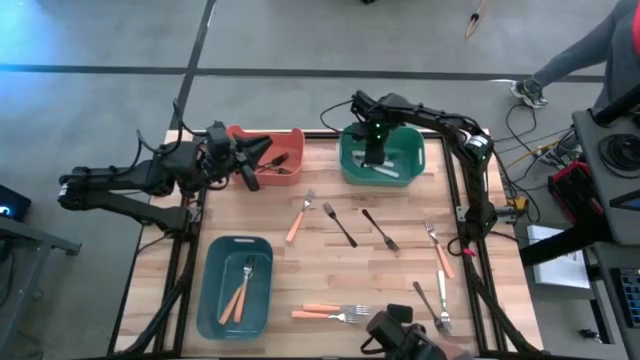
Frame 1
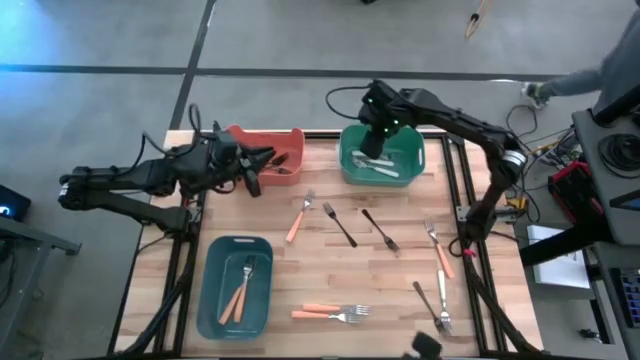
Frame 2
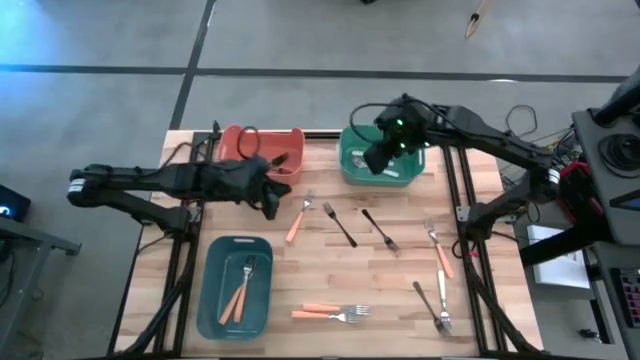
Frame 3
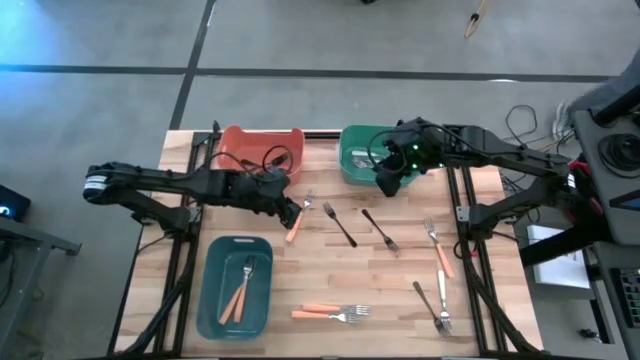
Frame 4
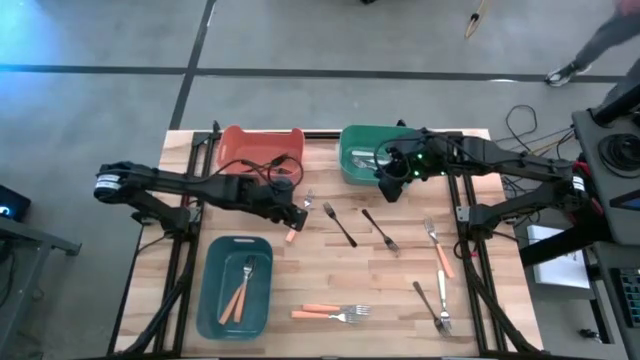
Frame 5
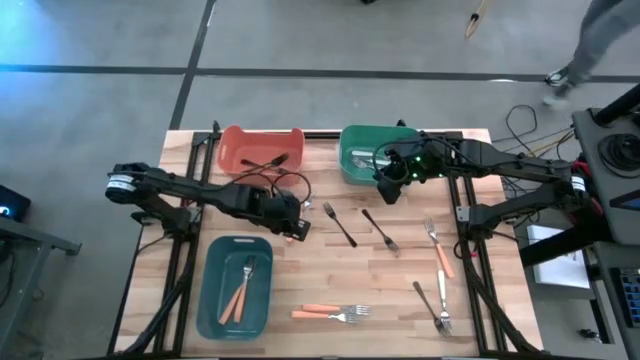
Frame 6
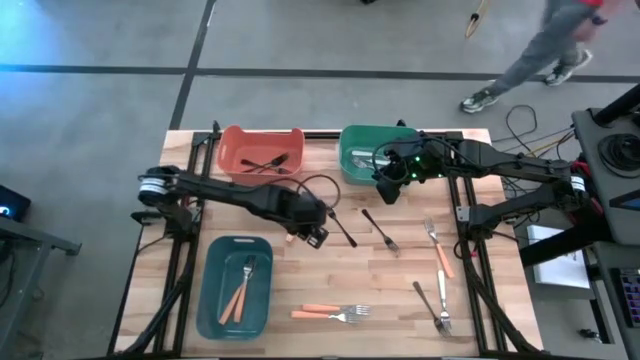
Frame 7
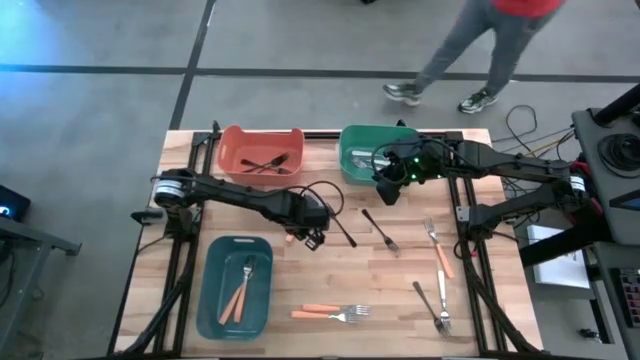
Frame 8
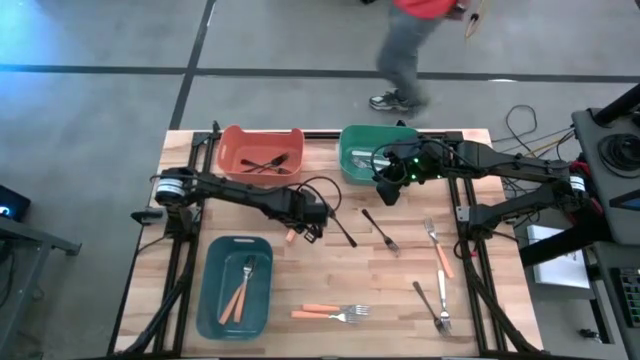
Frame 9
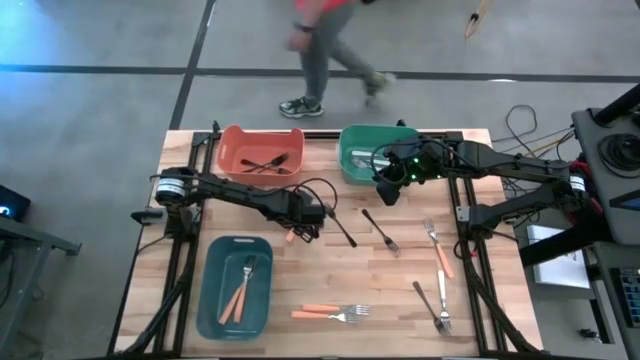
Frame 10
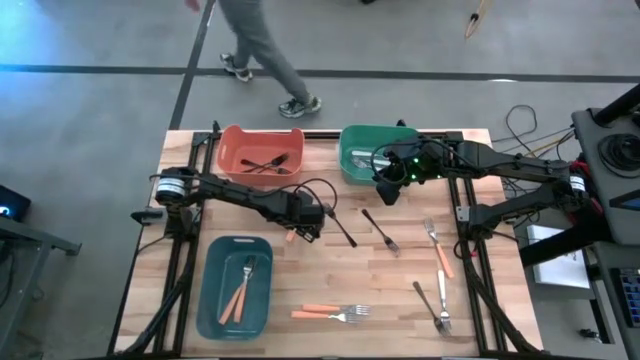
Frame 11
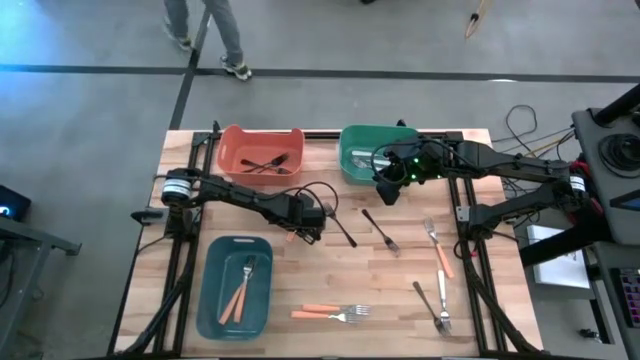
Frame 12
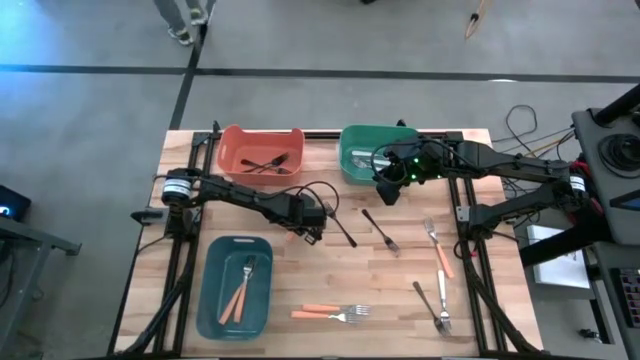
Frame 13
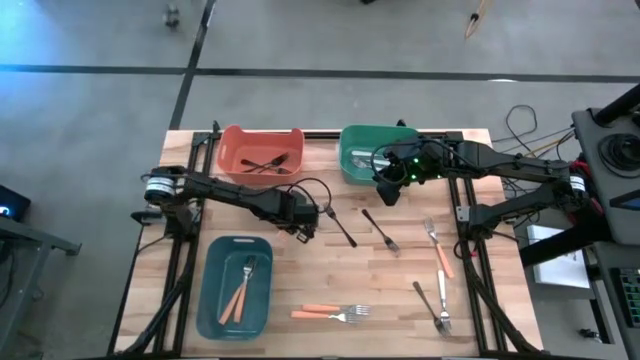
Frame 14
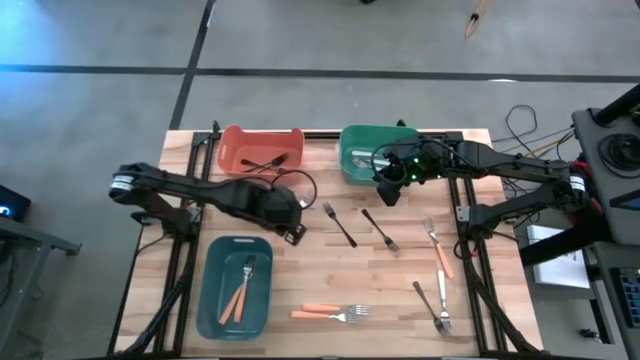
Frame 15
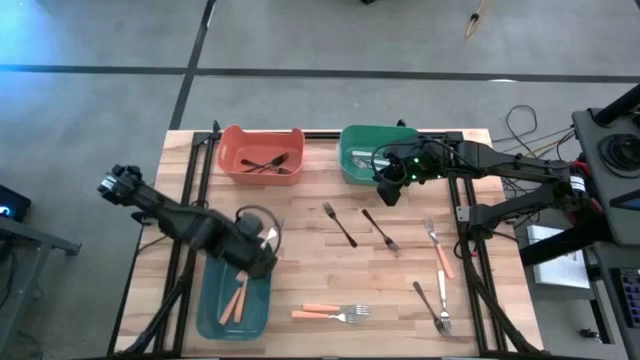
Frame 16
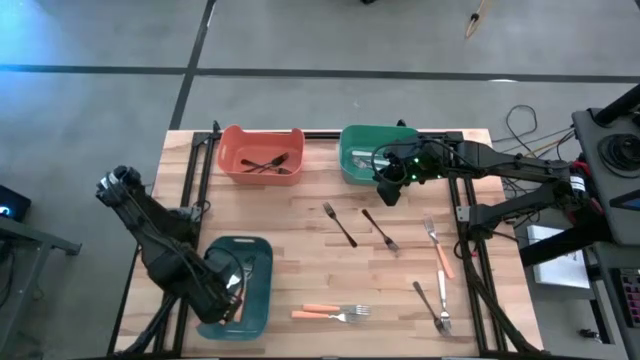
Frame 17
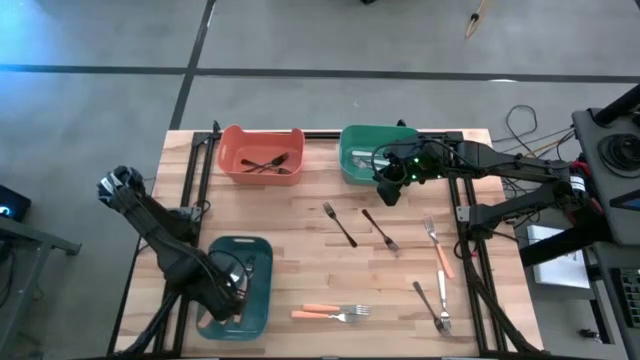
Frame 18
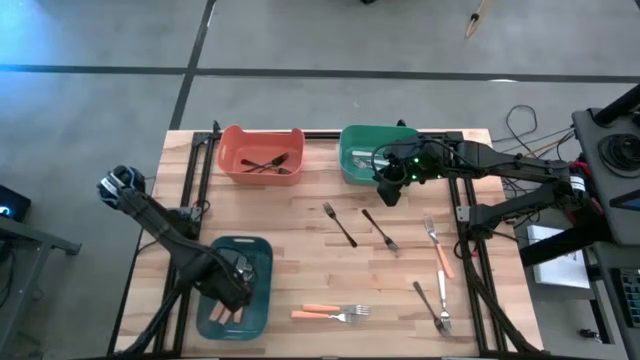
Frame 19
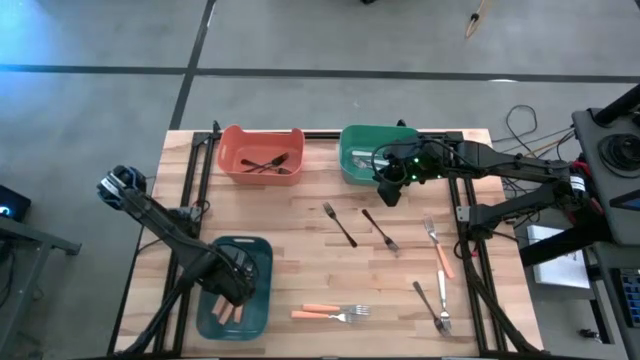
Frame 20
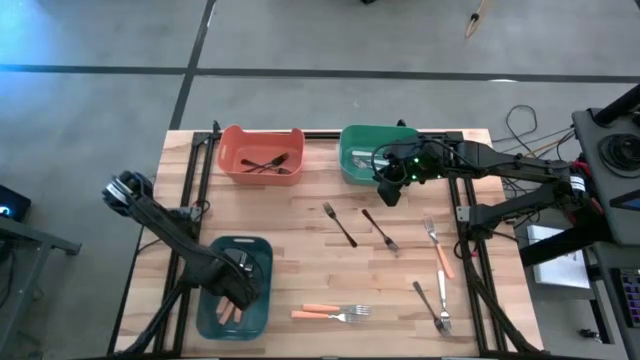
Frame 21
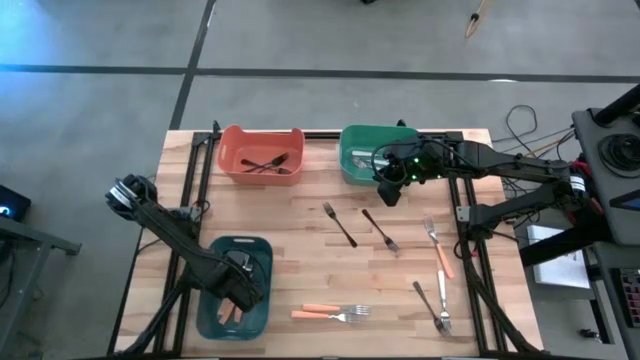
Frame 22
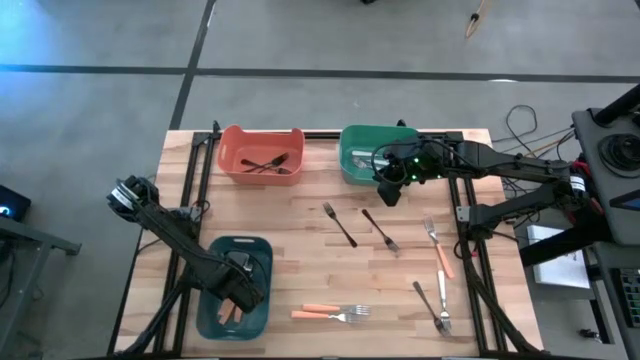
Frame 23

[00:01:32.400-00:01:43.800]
Task: Sort silverware by color (type)
Put the orange fork into the blue-green bin

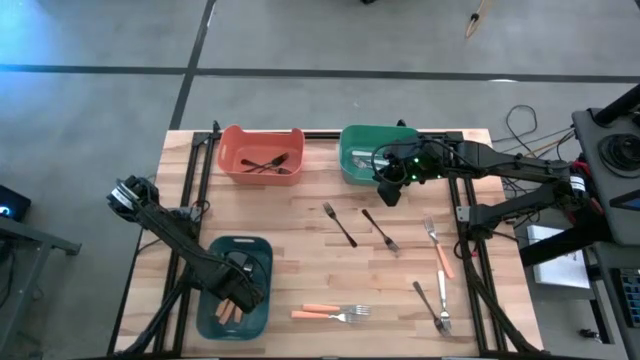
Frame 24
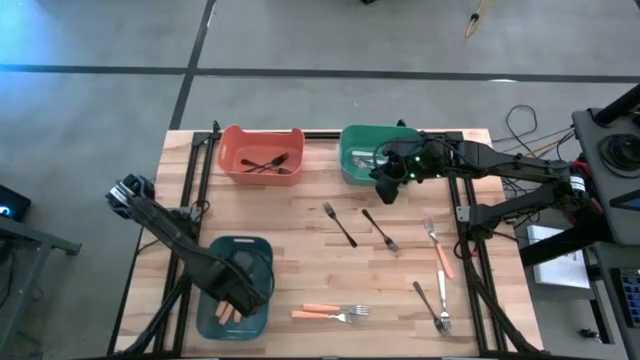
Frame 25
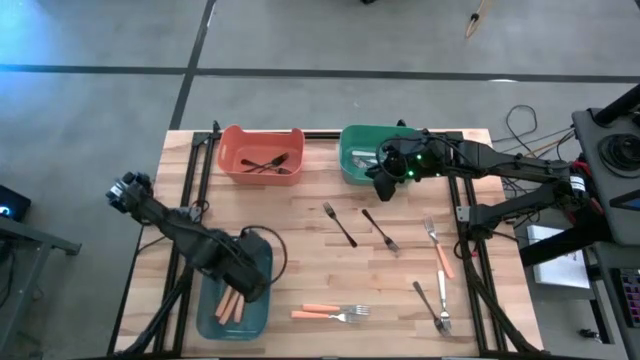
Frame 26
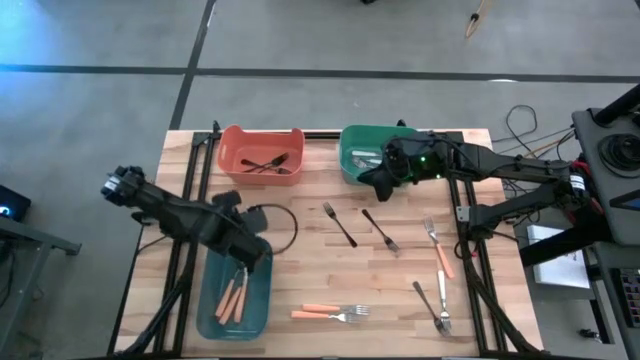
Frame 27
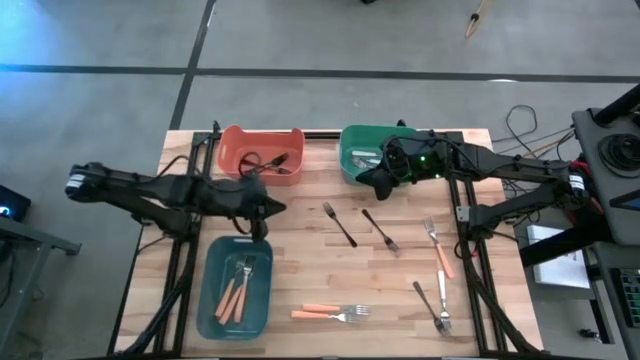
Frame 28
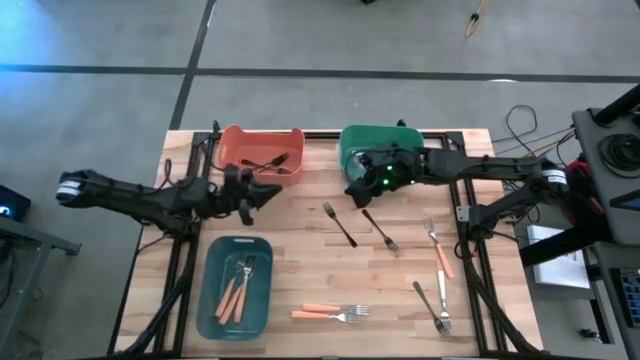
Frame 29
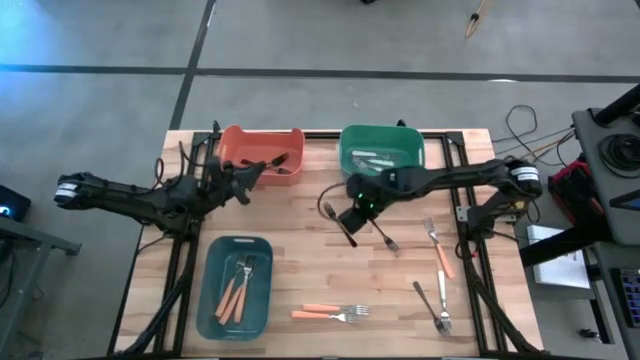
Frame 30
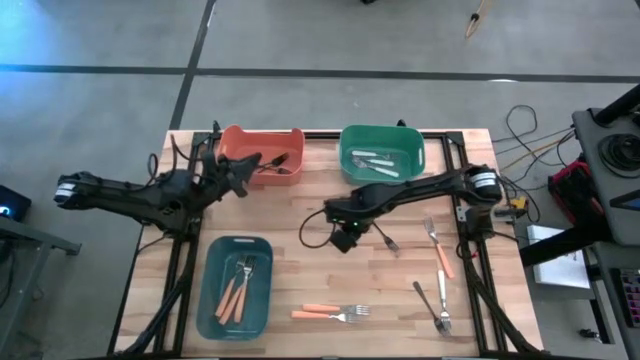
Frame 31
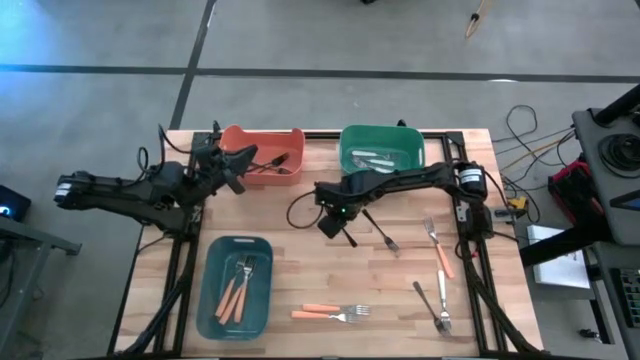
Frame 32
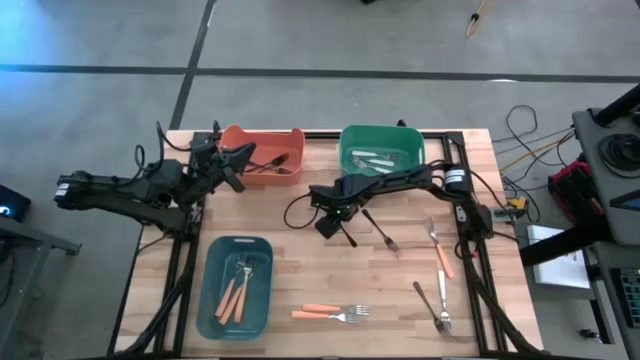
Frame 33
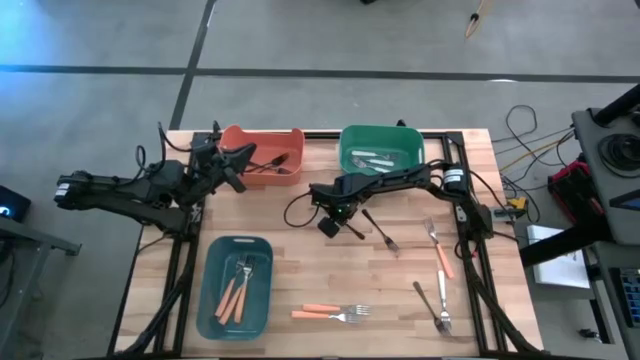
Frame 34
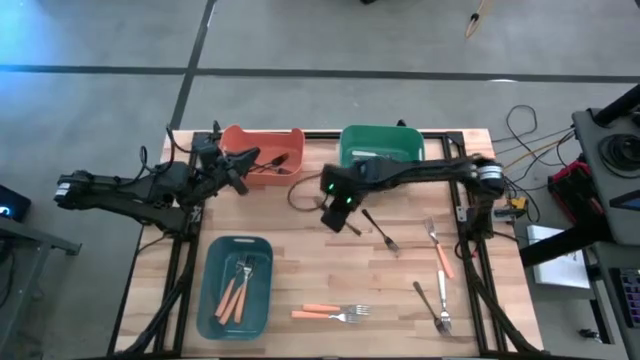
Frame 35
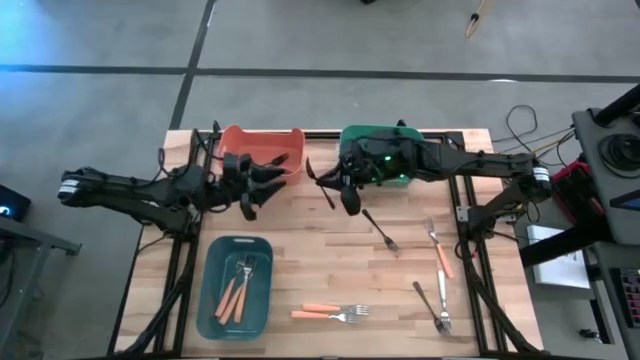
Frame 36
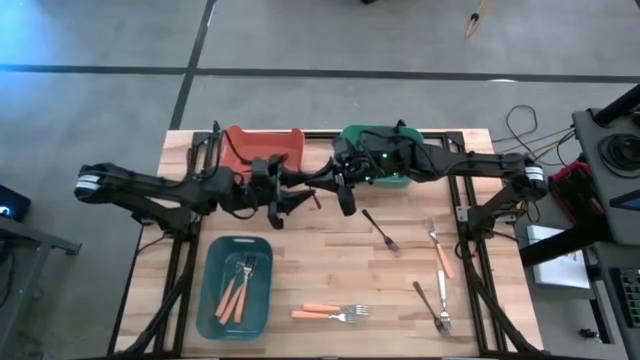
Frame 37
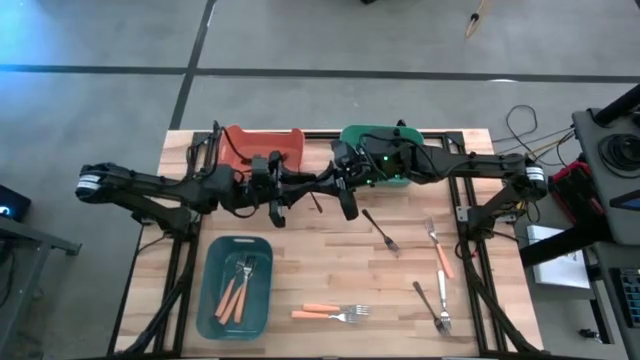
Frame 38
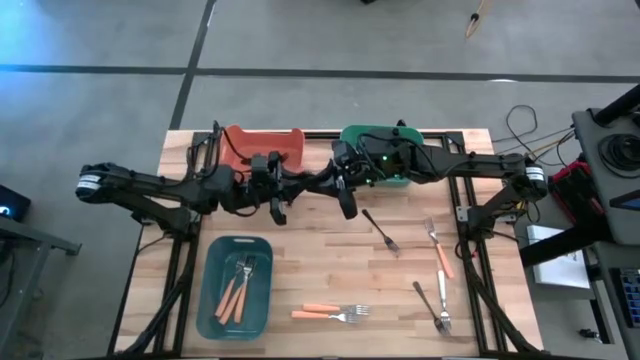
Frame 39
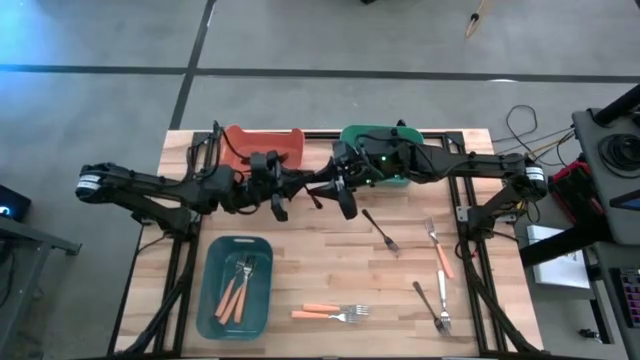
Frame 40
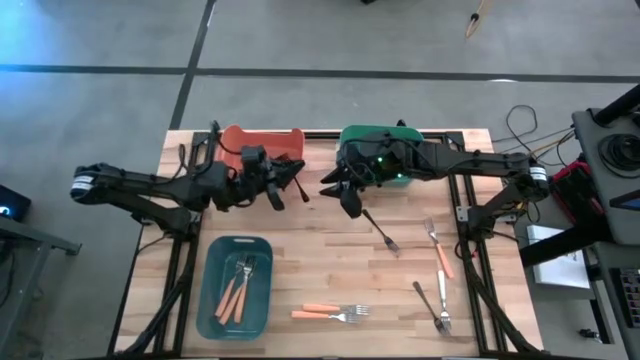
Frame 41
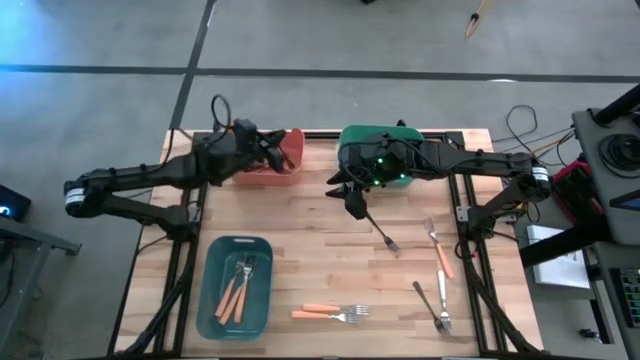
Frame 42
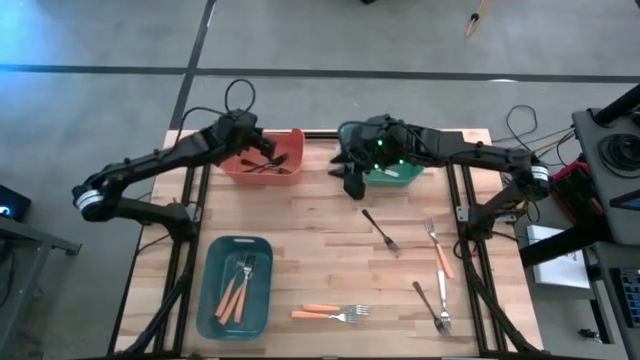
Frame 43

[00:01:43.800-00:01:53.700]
Put the black fork into the orange bin
